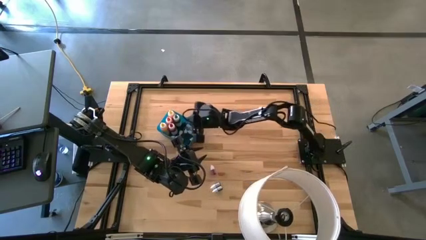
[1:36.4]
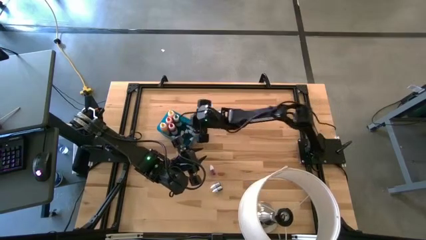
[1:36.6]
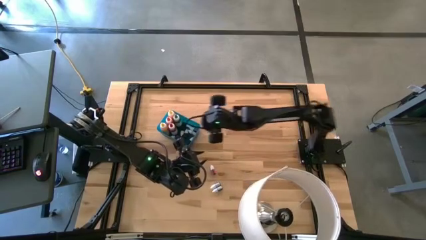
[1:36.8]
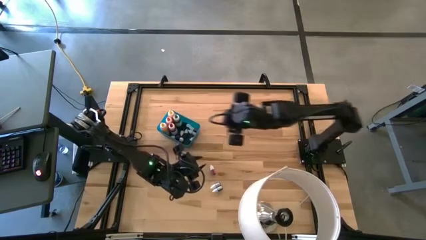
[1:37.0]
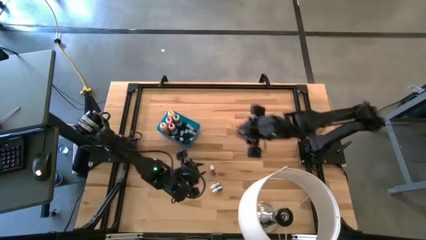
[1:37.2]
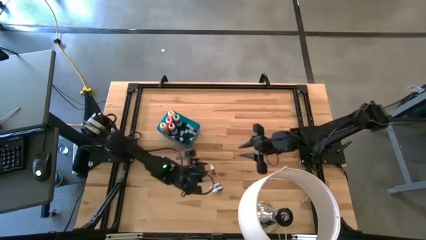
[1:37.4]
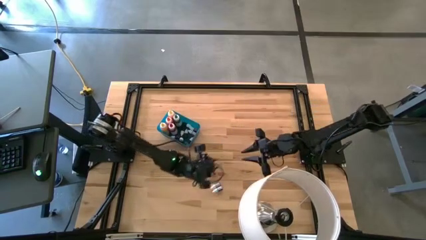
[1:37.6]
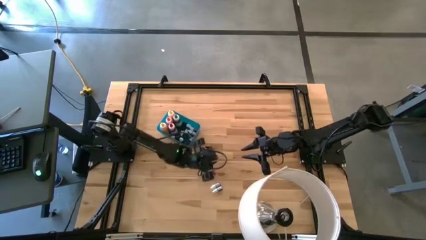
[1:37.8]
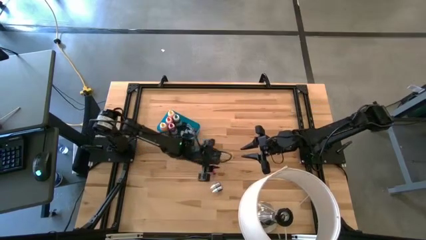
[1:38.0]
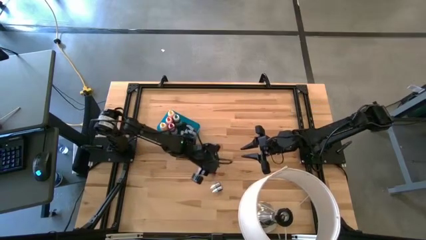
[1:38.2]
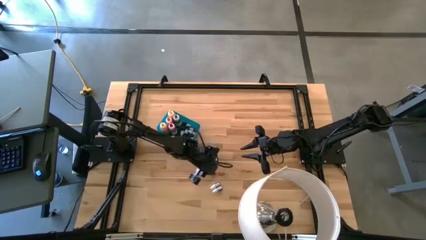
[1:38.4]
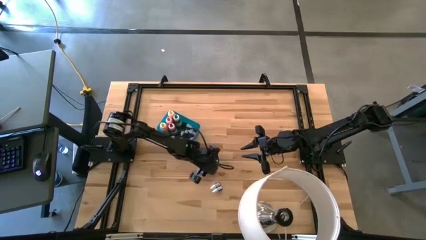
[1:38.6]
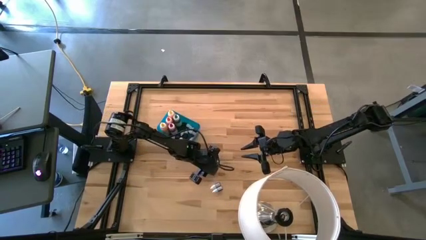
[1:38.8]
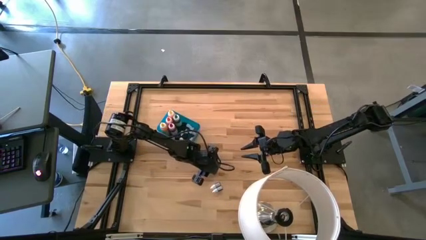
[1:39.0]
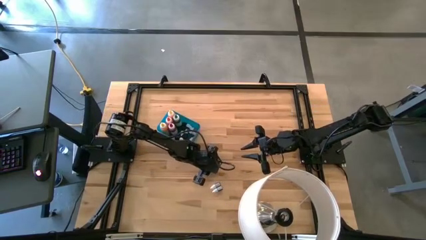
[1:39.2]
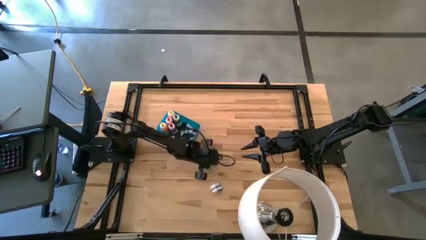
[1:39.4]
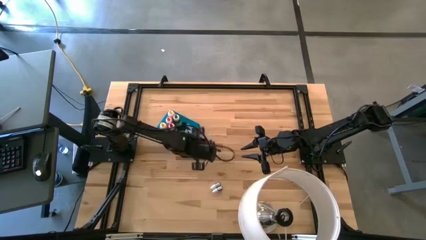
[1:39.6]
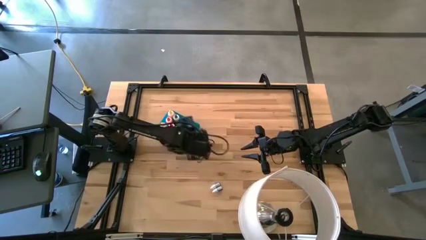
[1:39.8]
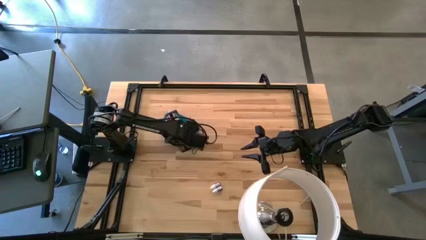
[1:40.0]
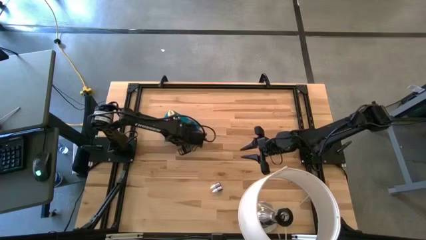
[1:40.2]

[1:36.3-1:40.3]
Task: Pick & Place food coloring
Put the small pink food coloring bottle into the blue bin

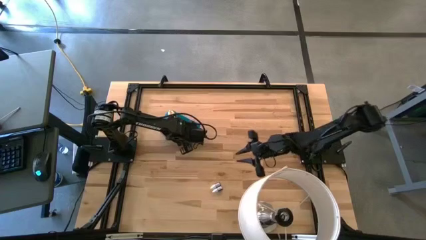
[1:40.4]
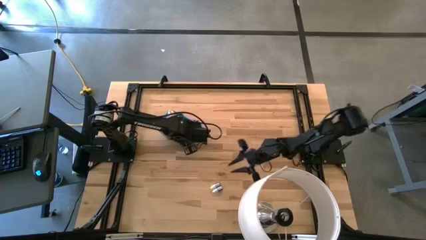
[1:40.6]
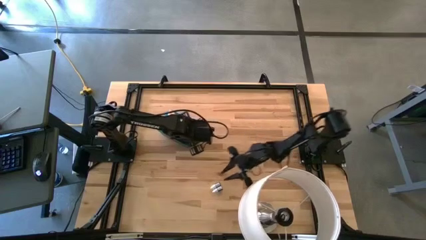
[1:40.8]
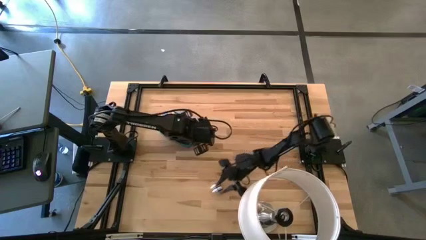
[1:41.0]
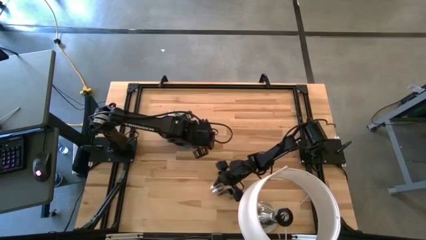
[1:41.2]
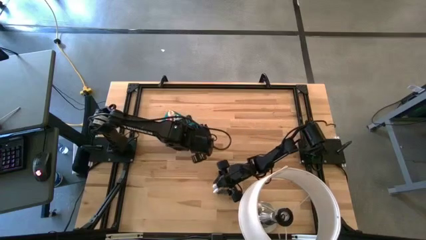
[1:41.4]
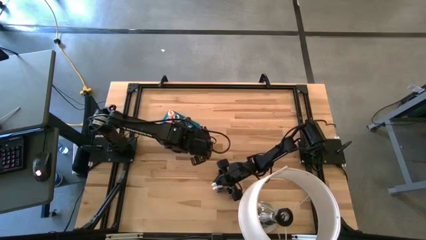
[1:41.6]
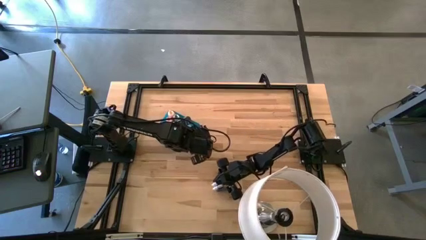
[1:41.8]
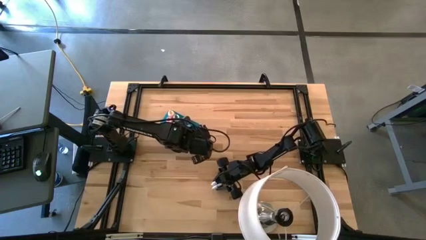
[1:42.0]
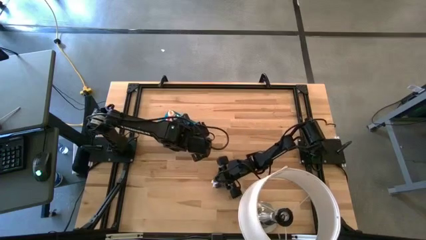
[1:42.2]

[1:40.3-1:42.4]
Put the small blue food coloring bottle into the blue bin

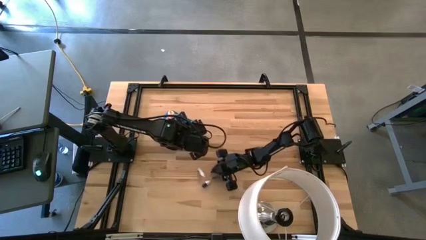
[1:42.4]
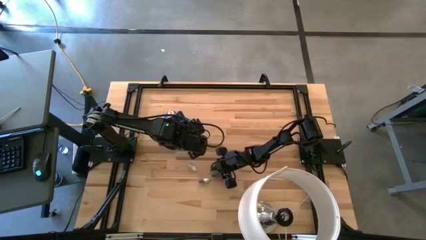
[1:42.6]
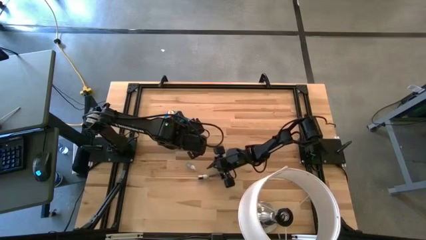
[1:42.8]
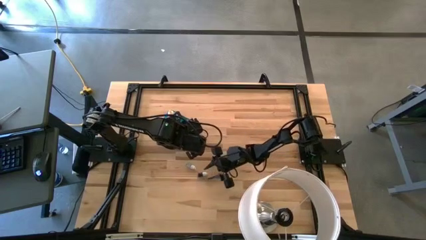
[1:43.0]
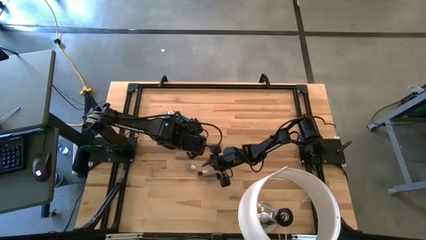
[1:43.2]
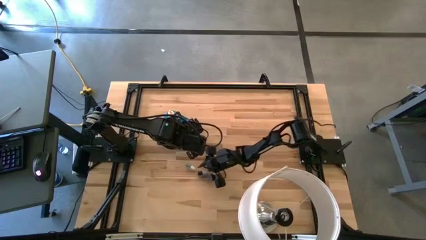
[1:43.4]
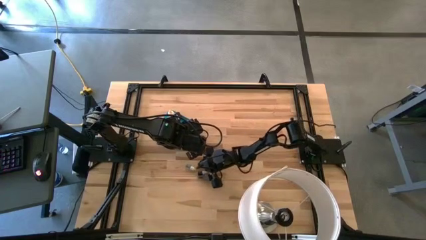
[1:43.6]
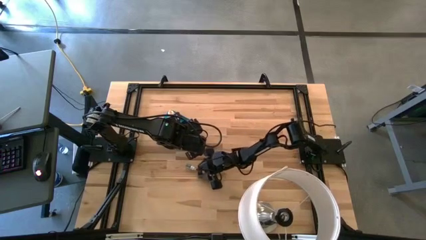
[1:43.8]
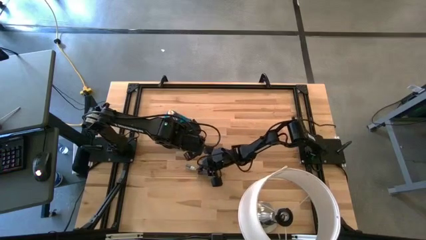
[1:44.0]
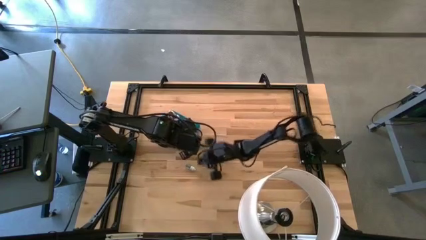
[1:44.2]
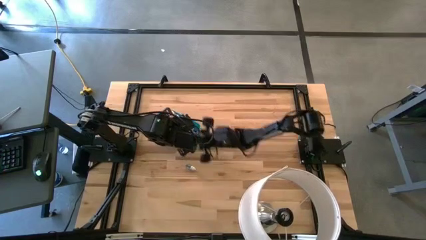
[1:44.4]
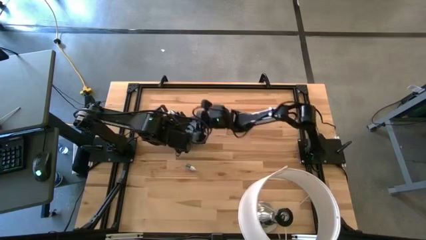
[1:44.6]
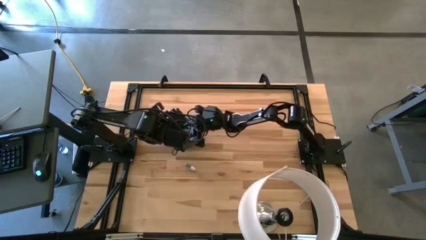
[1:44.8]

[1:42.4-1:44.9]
Put the small blue food coloring bottle into the blue bin

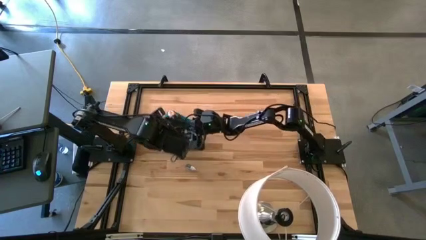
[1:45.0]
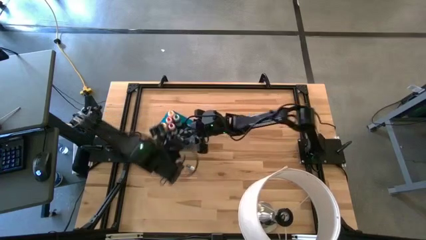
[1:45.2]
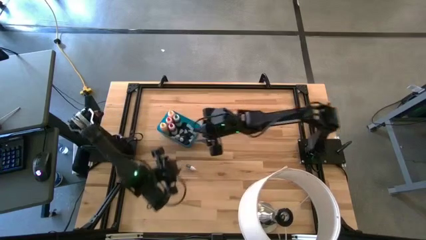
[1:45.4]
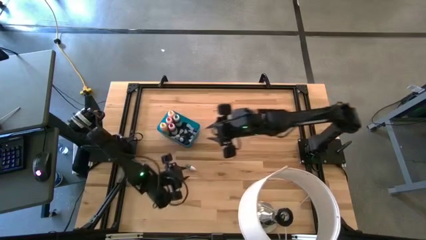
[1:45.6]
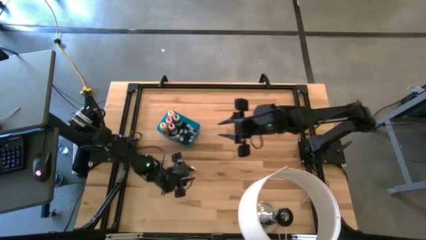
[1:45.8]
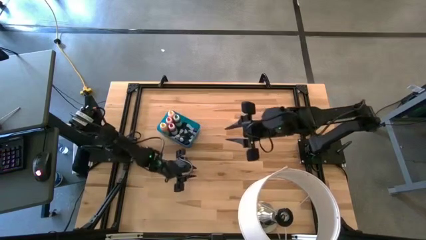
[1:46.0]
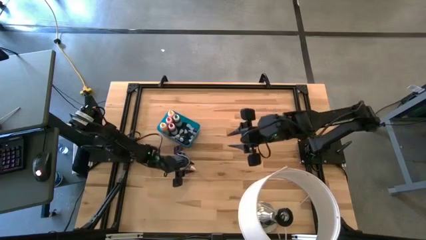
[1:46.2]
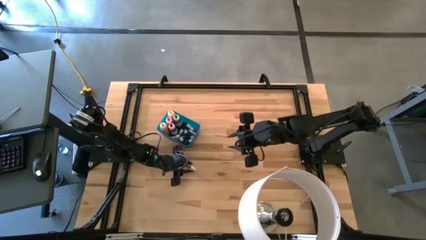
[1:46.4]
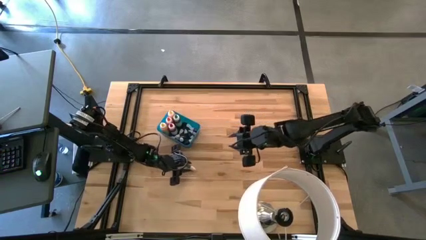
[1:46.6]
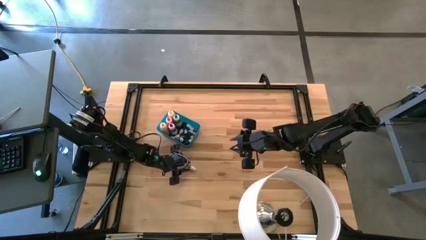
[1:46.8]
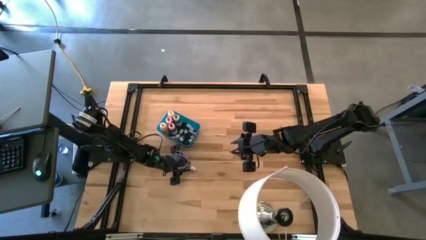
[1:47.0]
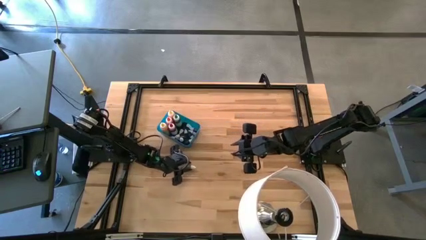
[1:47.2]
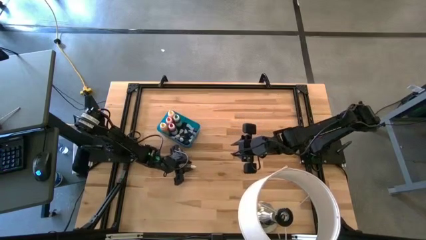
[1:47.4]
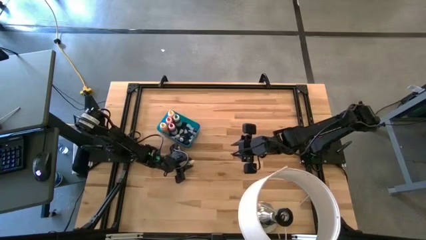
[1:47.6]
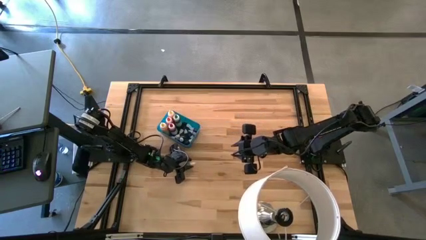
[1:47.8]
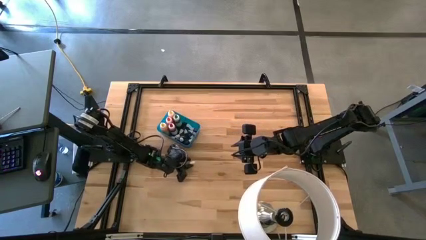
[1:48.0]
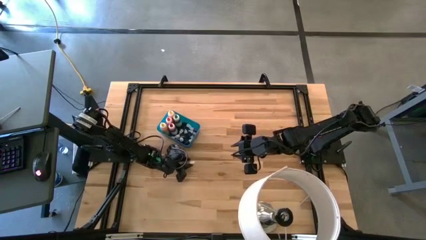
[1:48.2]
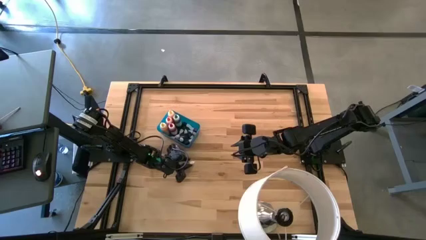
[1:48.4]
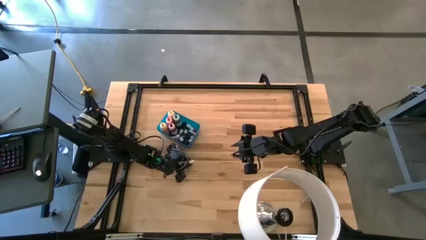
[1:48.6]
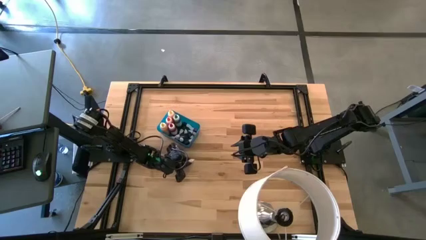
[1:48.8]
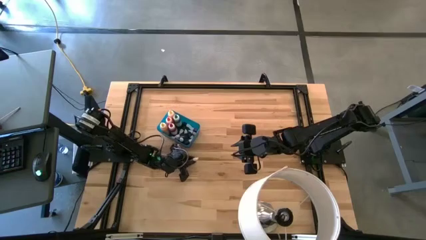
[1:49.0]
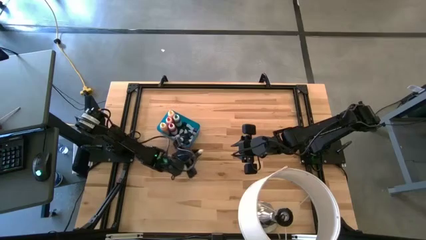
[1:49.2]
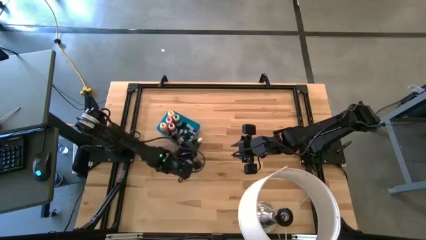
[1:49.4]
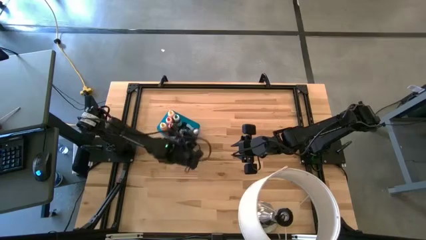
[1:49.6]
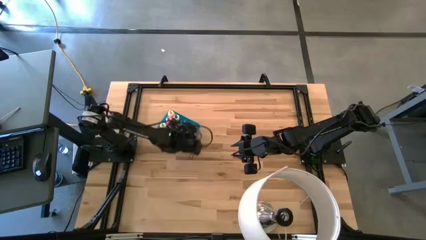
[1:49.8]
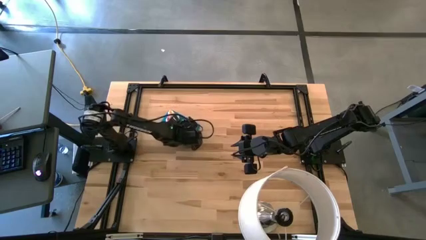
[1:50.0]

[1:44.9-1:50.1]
Put the small green food coloring bottle into the blue bin

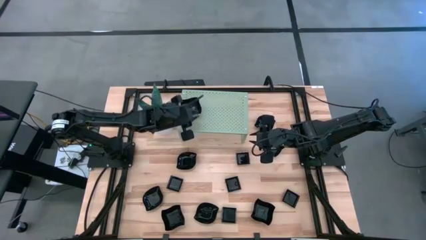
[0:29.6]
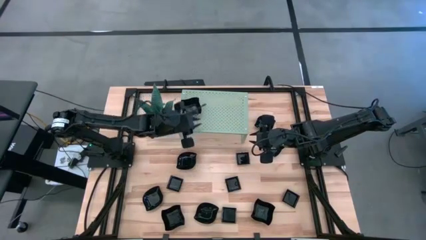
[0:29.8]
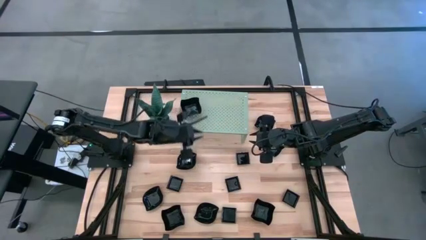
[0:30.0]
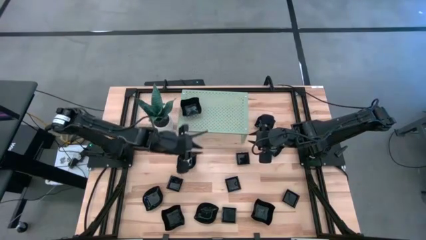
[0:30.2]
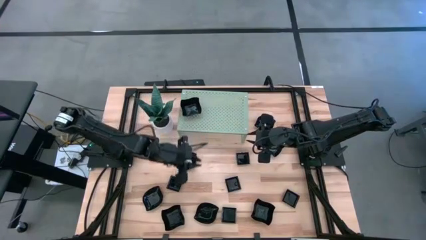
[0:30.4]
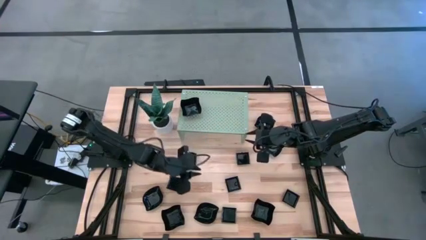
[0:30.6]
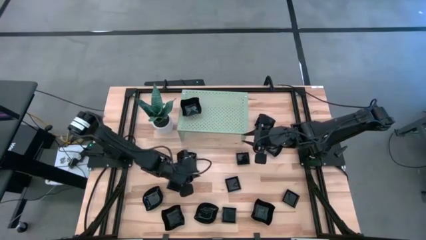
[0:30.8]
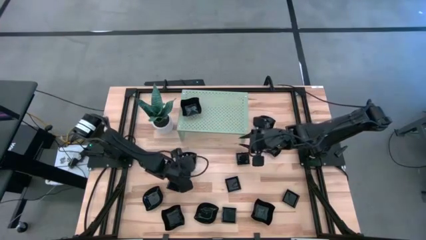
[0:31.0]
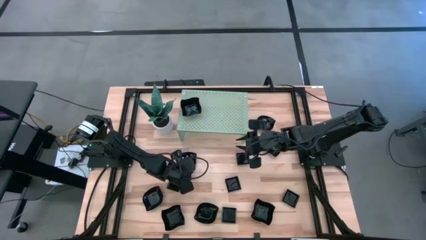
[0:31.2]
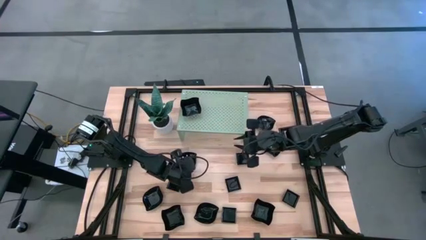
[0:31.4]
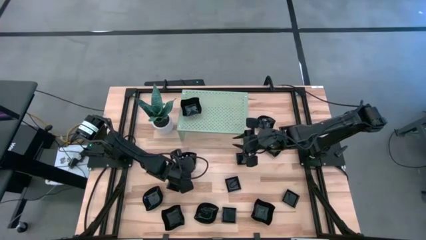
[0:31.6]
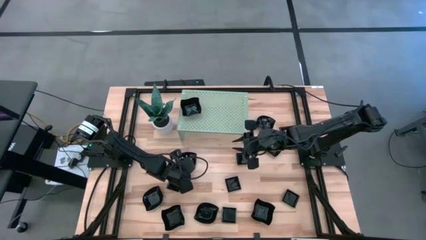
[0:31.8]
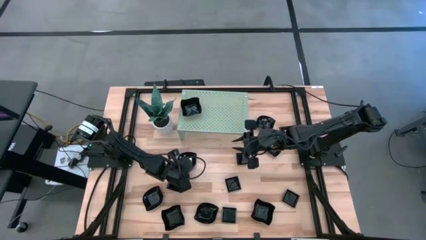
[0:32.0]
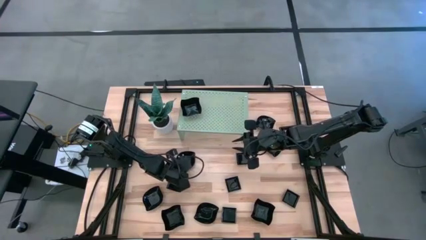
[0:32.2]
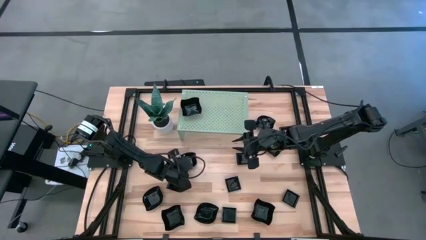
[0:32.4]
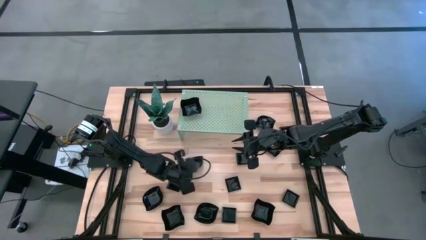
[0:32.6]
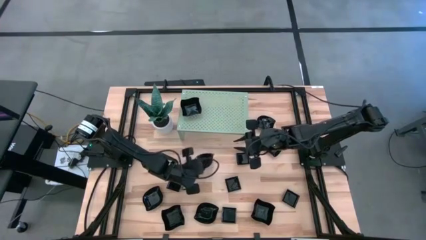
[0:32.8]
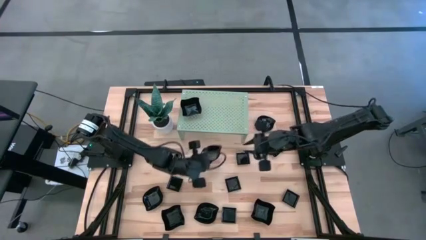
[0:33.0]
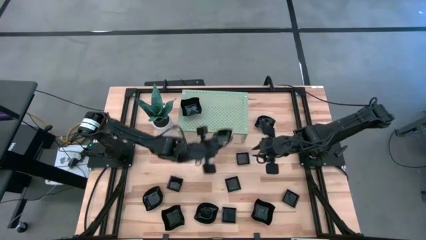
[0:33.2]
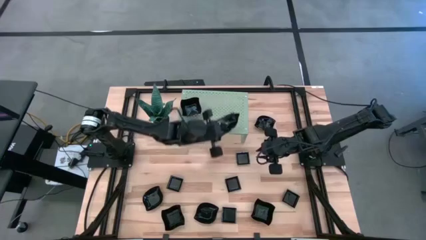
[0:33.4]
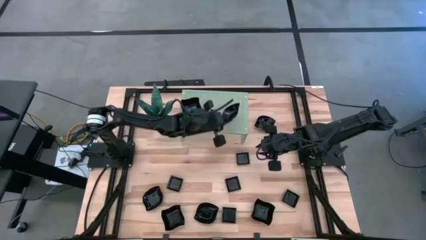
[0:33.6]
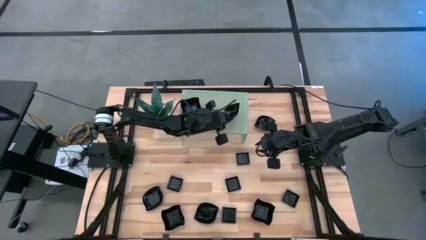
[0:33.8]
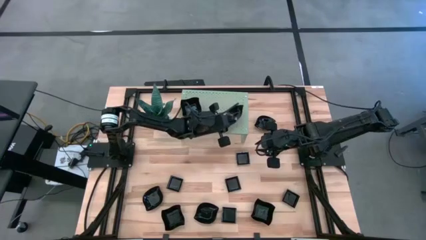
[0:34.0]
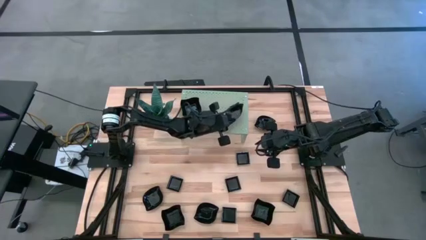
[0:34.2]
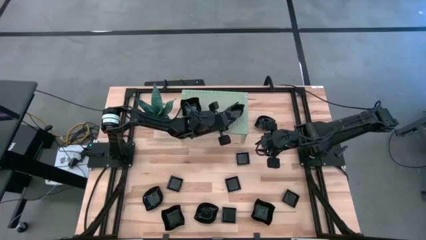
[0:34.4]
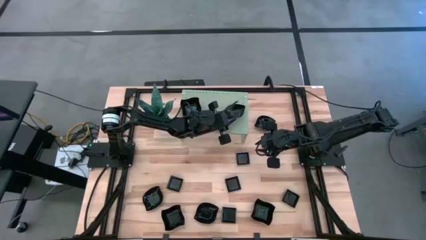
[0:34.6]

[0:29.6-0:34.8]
Task: Pick & Place Mini shaped plates
Put the leaf-shaped plate on the shelf
